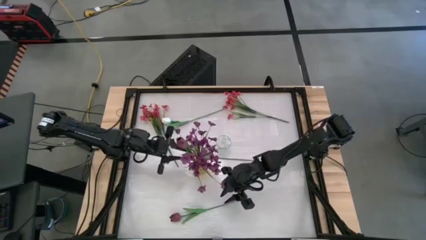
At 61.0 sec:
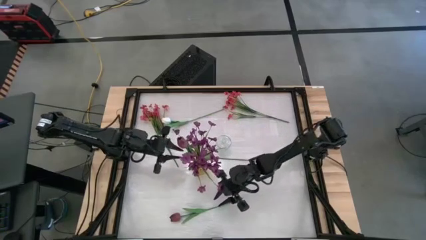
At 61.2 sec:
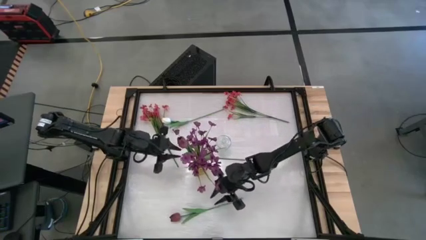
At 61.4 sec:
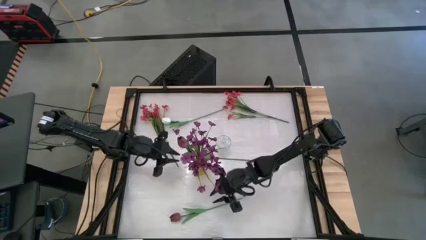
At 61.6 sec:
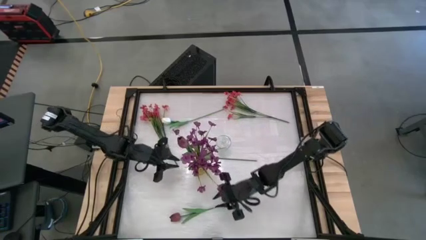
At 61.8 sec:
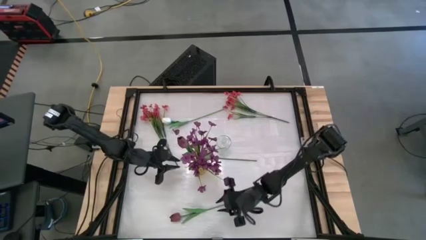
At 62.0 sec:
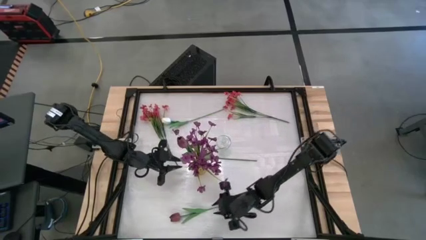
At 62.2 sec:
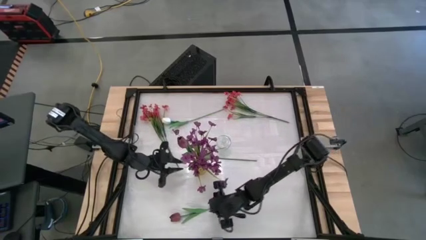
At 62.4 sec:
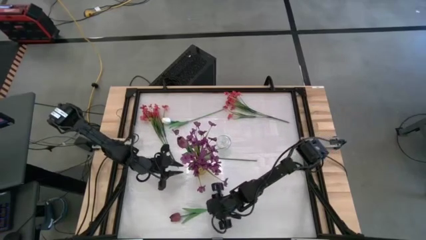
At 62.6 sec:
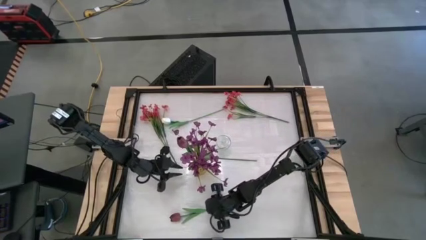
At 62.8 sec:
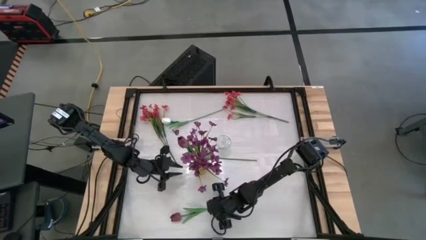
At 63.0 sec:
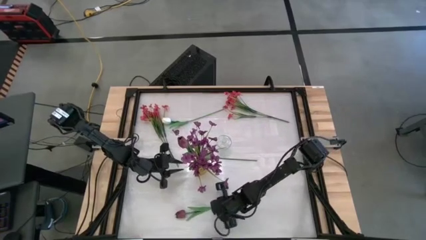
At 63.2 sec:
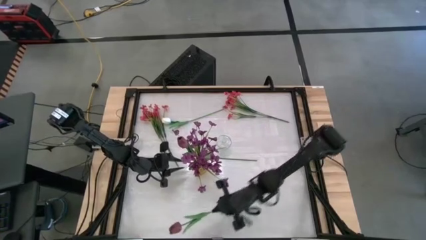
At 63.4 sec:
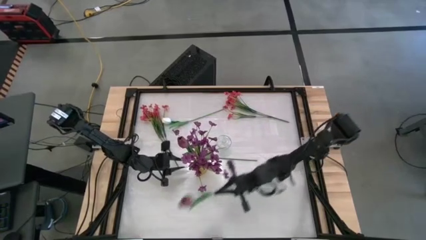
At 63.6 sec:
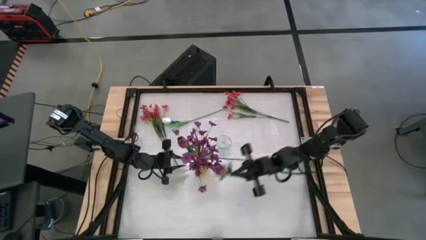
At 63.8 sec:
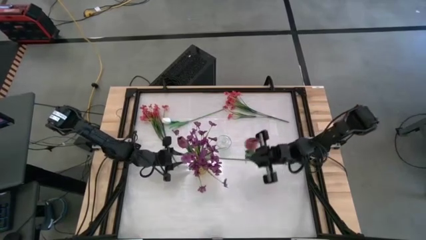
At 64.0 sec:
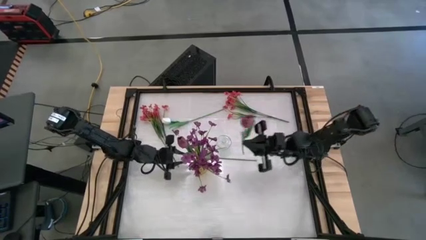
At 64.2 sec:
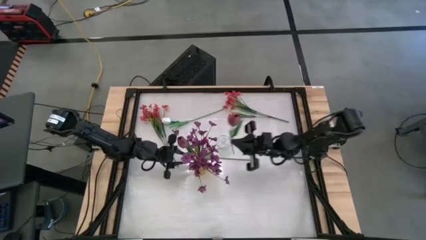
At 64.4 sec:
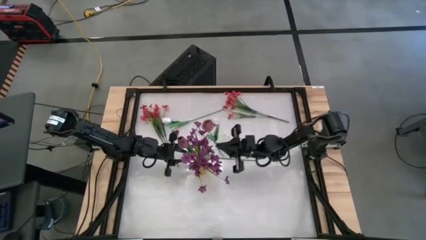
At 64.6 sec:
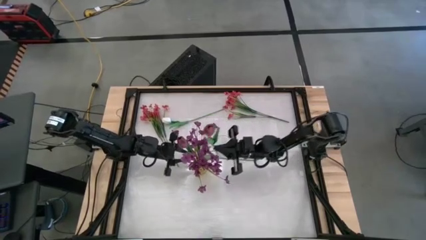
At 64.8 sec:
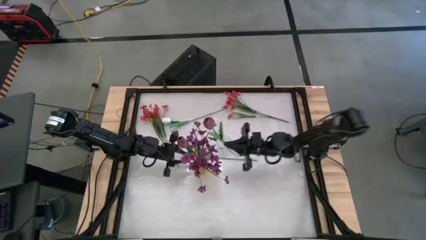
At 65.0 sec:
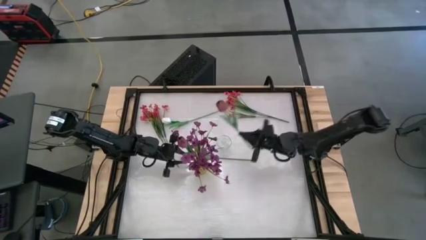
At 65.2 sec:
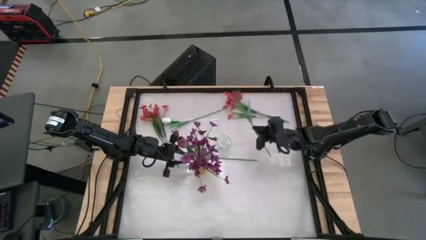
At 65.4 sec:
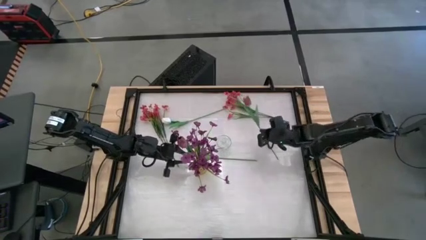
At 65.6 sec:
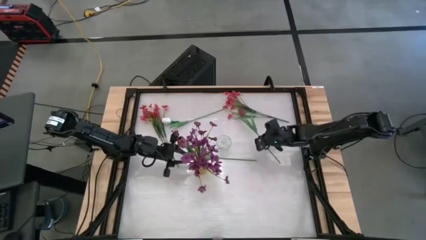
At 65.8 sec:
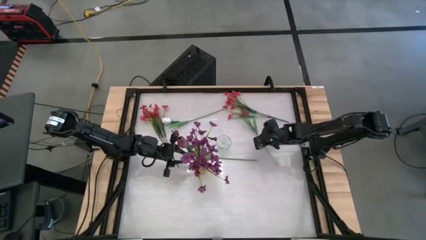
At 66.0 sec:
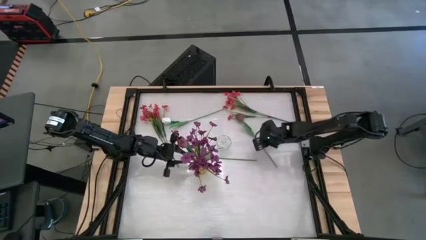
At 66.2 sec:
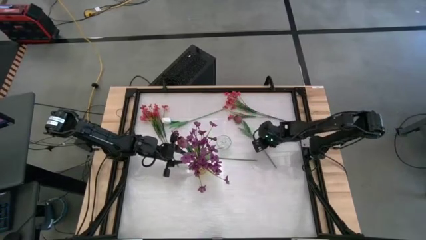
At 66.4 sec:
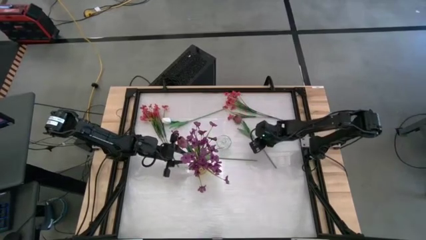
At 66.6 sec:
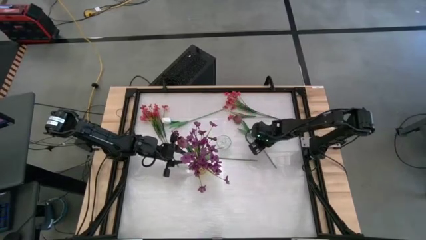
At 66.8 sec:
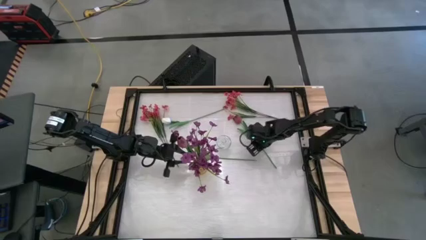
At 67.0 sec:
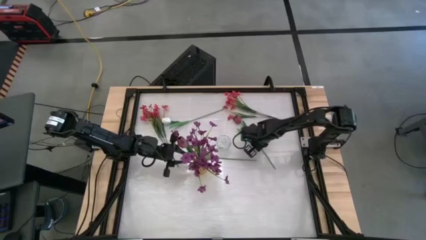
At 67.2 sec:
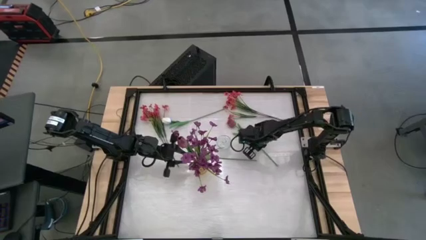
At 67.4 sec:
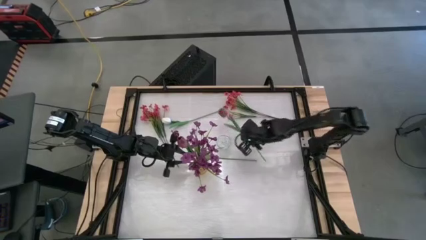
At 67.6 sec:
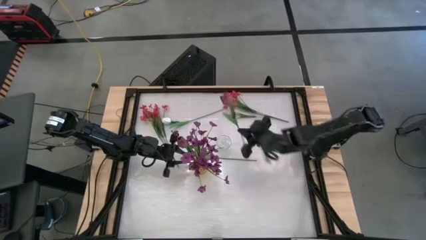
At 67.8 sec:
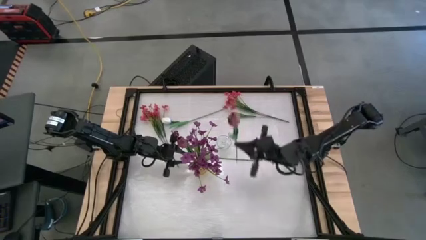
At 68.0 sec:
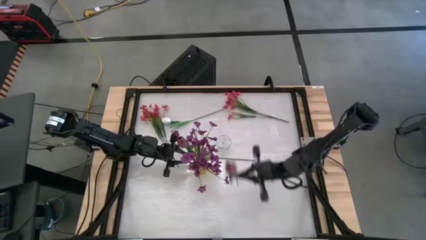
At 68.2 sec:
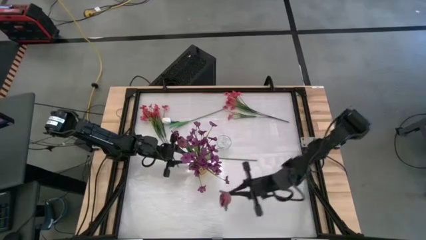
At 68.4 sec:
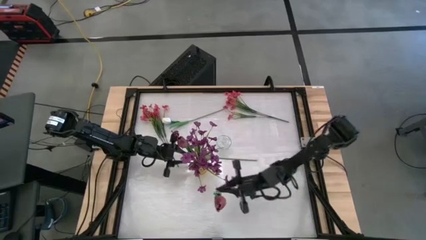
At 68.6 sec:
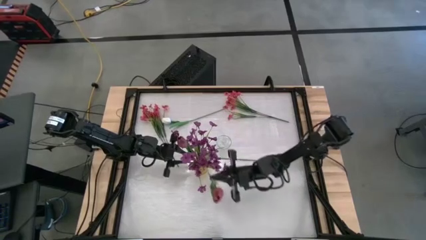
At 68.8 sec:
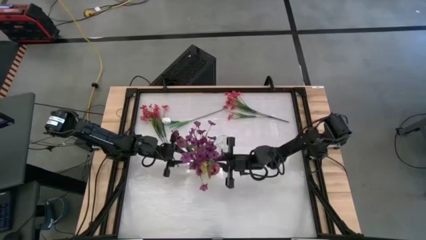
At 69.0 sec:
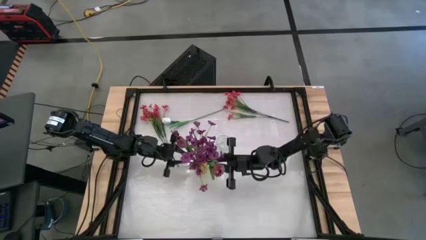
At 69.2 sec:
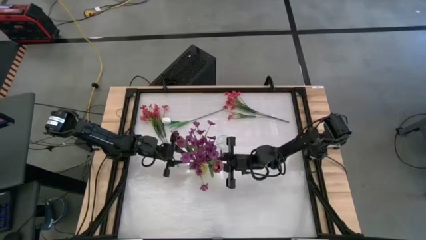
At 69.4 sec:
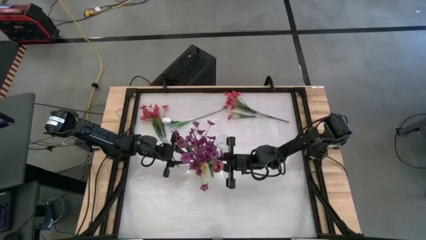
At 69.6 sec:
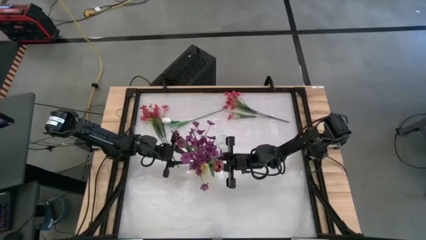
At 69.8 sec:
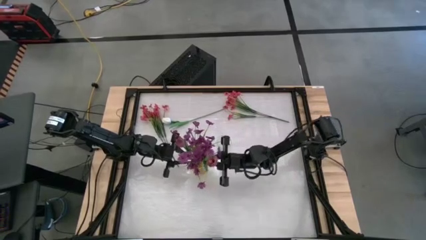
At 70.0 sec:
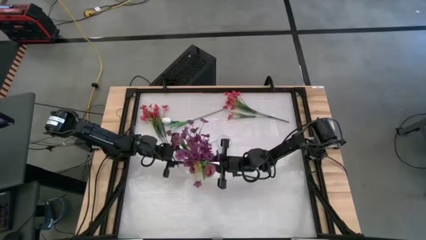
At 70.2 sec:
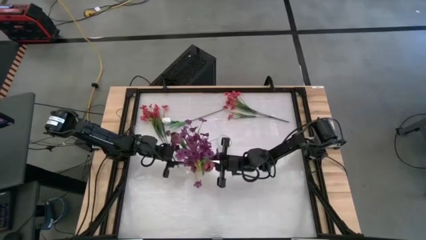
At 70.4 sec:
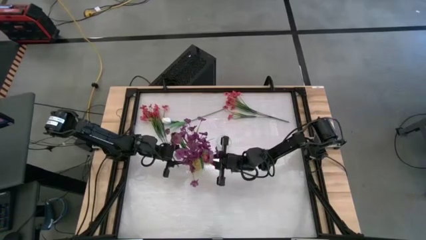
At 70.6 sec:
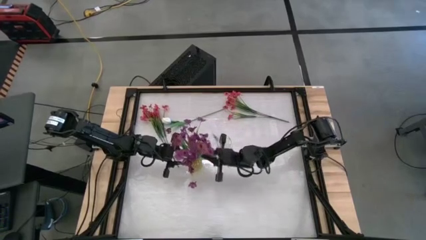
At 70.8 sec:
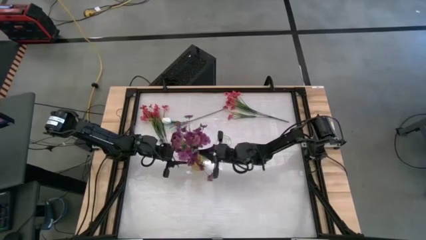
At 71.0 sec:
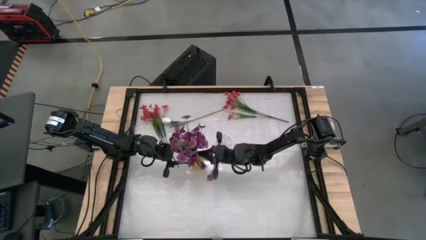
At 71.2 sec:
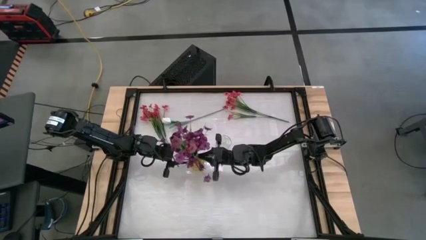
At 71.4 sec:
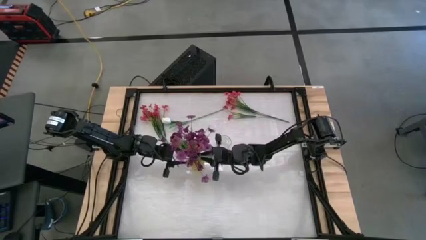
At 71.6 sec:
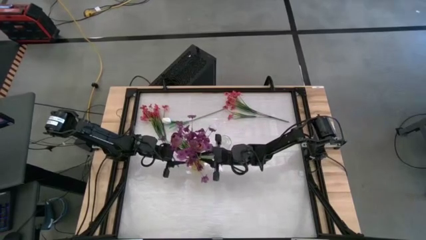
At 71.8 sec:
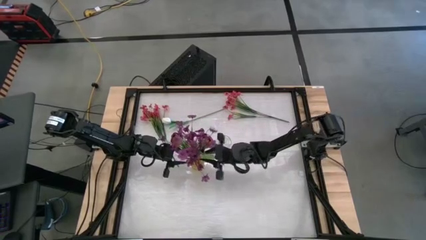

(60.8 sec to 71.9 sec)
Task: Sort flowers into vase by color
Put the red tulip into the yellow vase

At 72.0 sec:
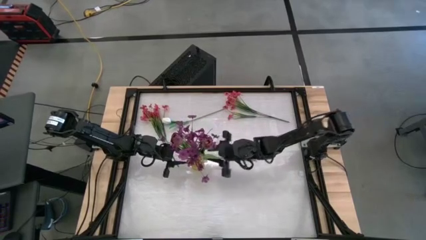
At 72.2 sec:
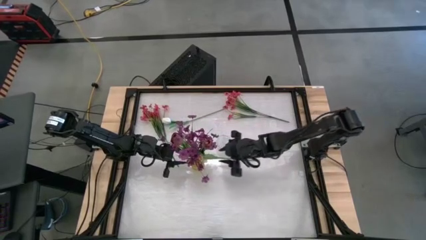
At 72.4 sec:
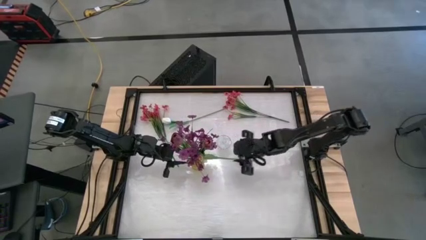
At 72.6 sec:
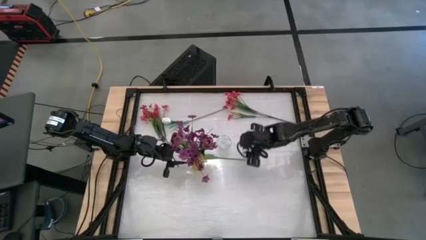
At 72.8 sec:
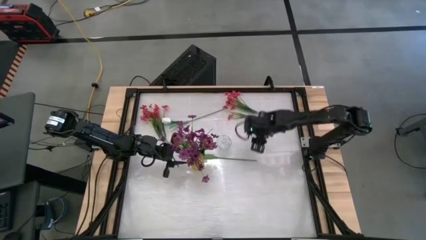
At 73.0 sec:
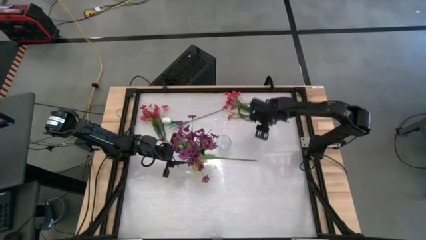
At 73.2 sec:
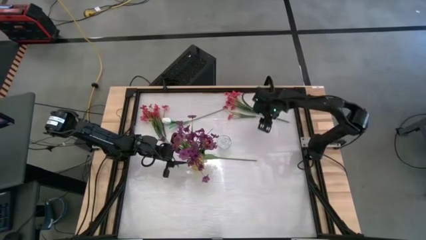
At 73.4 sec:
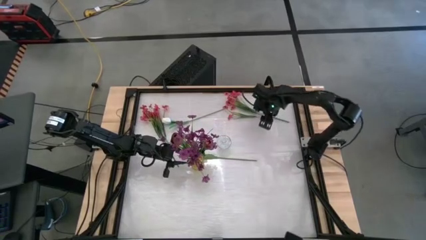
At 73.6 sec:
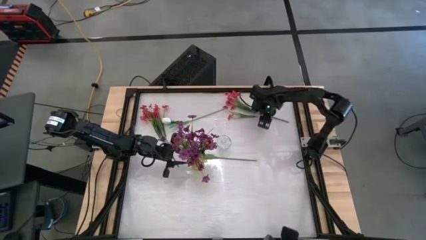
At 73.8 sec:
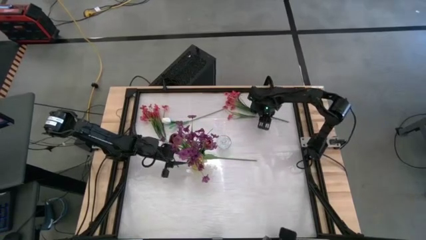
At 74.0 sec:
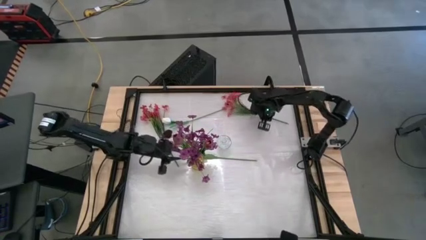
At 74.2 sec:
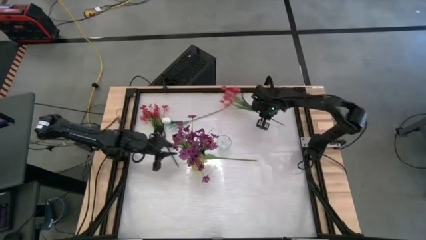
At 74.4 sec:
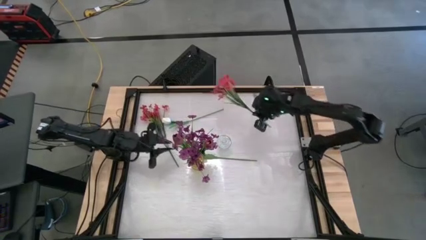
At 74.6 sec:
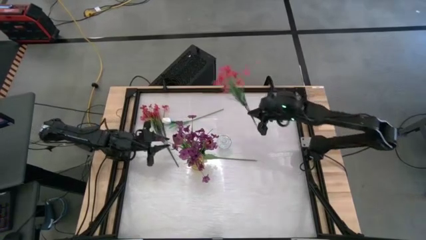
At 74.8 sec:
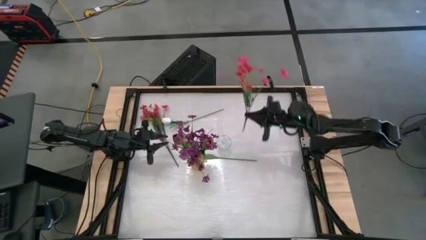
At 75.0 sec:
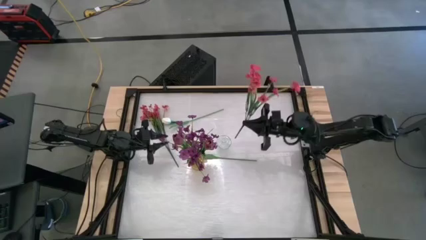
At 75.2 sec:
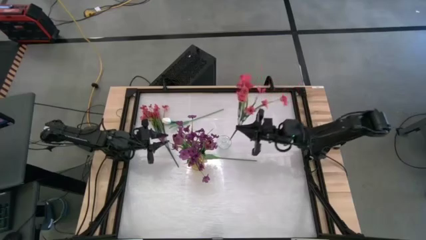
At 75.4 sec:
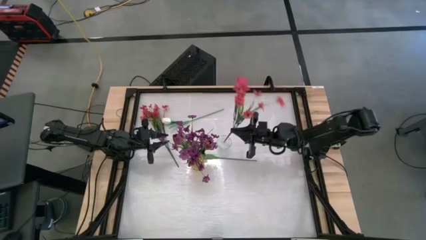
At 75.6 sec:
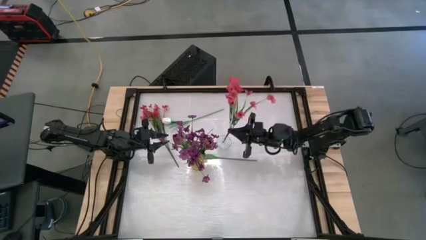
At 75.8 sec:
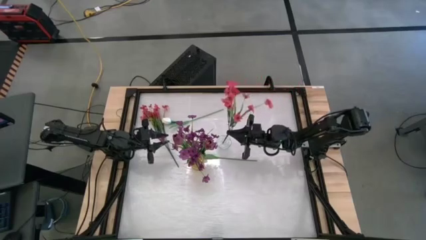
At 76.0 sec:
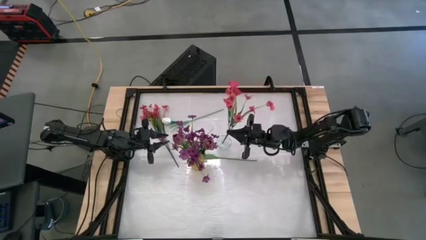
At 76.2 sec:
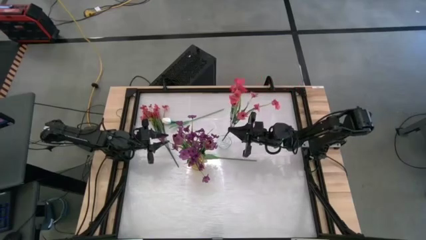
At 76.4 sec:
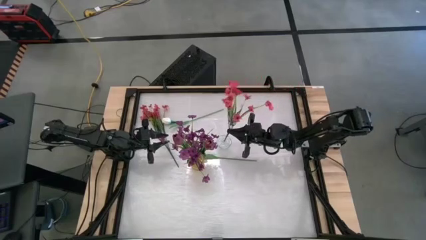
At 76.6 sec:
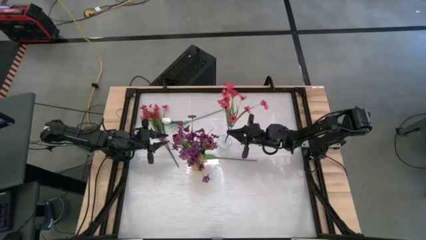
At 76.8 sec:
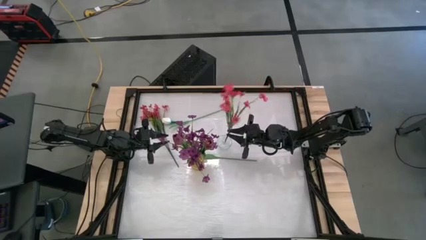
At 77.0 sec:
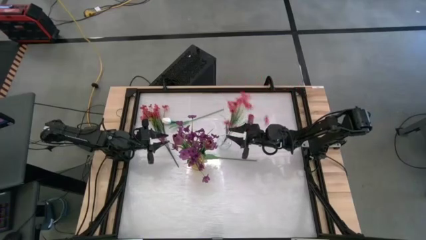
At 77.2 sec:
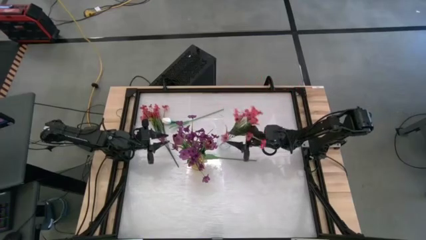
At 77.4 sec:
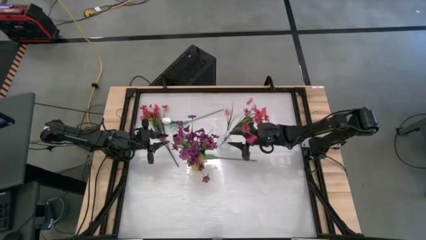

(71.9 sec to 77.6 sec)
Put the right red flowers into the transparent vase
